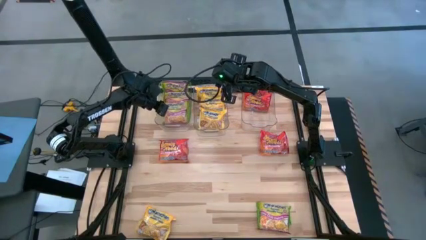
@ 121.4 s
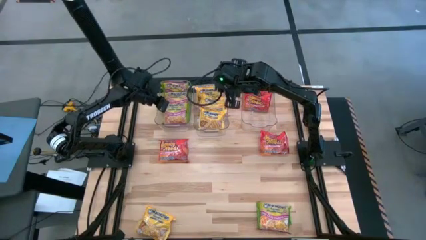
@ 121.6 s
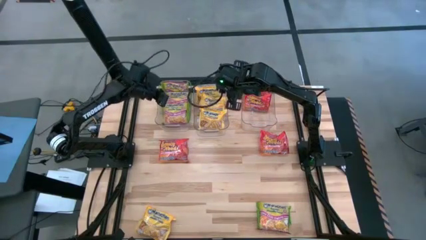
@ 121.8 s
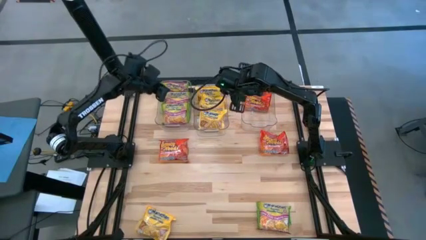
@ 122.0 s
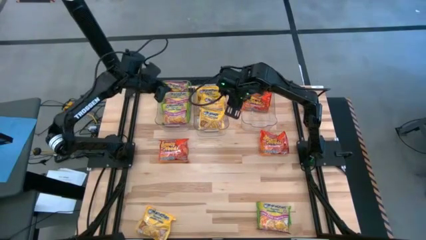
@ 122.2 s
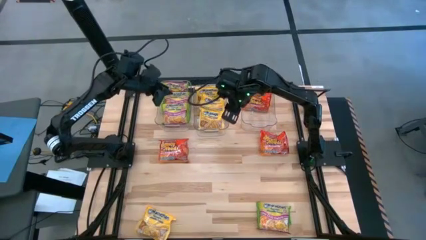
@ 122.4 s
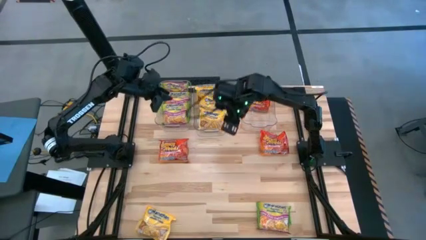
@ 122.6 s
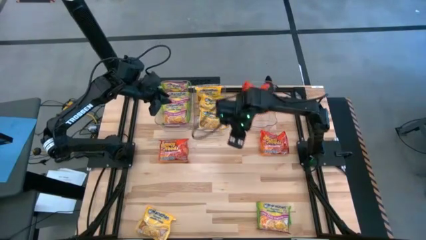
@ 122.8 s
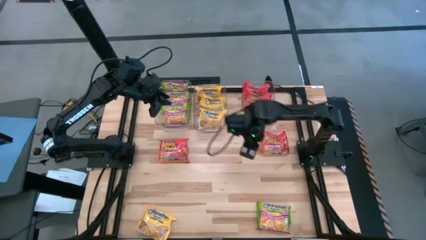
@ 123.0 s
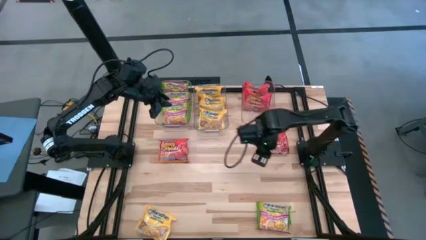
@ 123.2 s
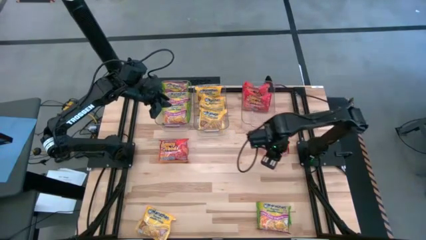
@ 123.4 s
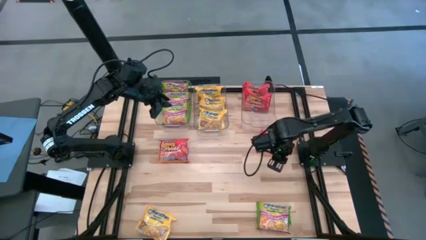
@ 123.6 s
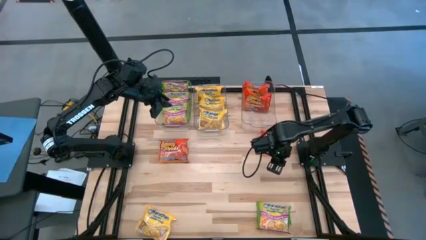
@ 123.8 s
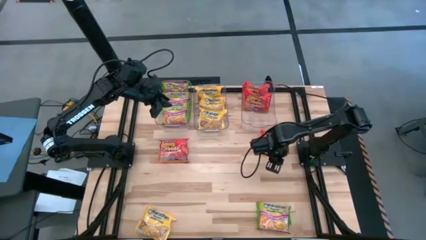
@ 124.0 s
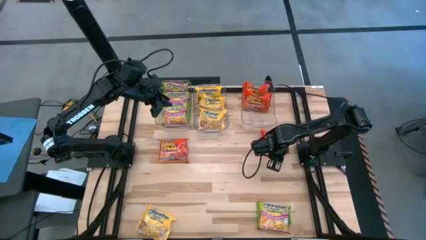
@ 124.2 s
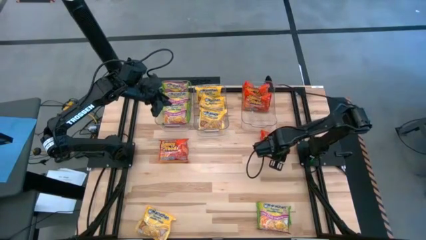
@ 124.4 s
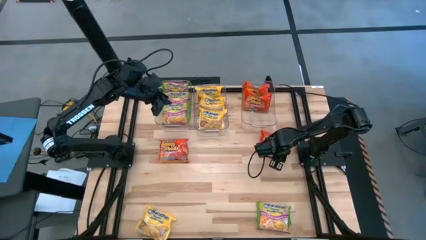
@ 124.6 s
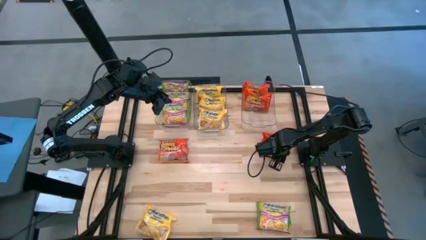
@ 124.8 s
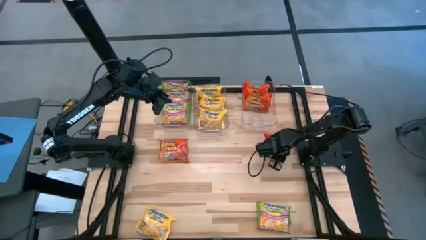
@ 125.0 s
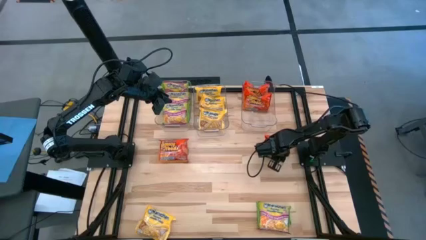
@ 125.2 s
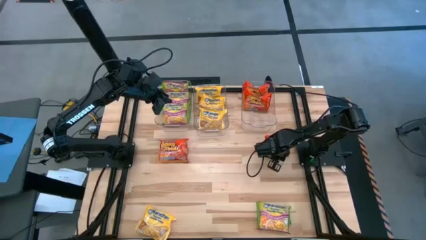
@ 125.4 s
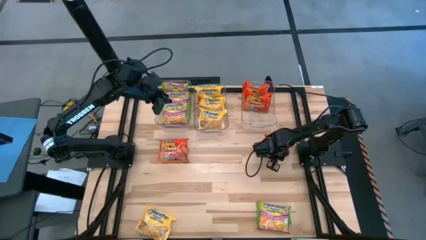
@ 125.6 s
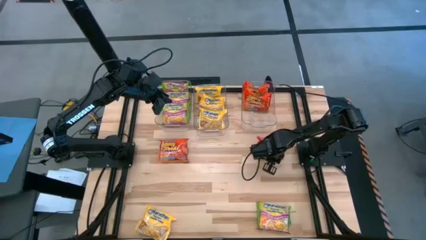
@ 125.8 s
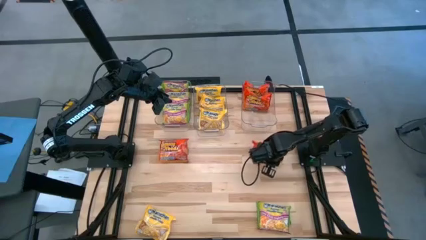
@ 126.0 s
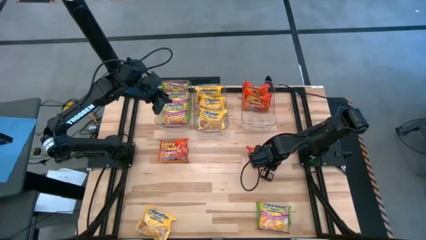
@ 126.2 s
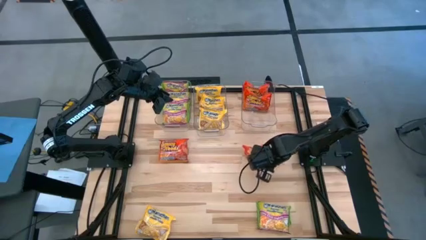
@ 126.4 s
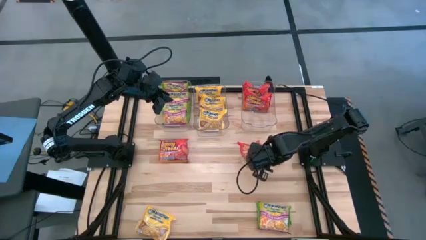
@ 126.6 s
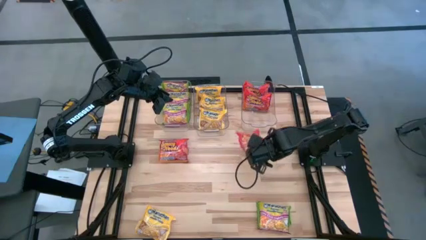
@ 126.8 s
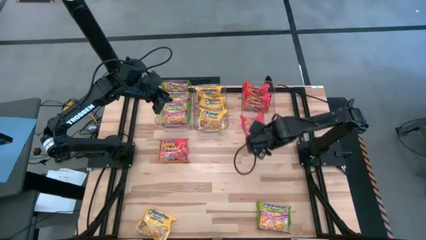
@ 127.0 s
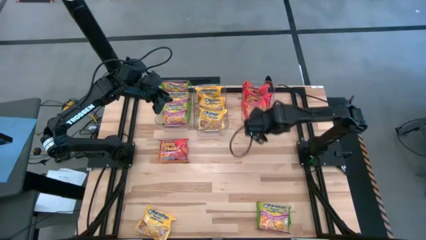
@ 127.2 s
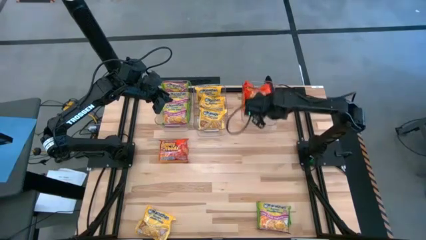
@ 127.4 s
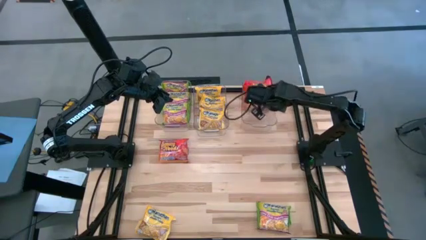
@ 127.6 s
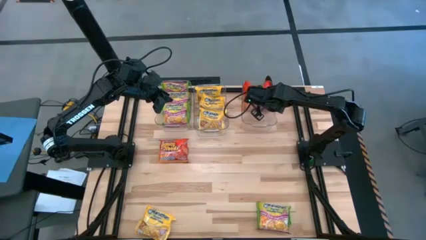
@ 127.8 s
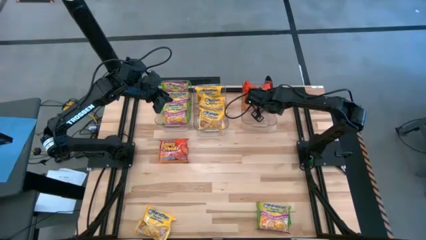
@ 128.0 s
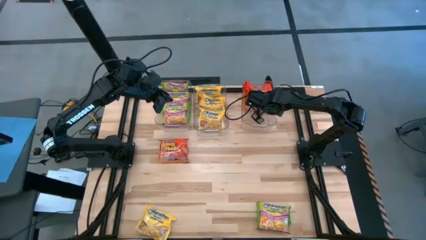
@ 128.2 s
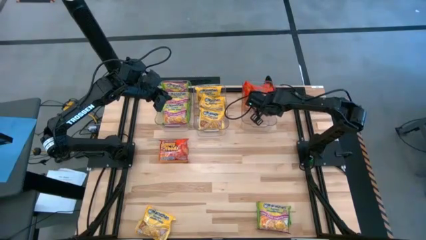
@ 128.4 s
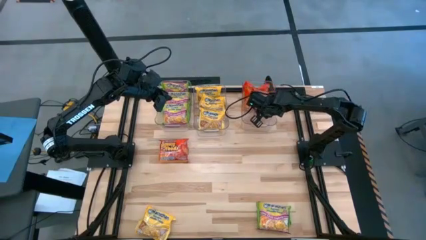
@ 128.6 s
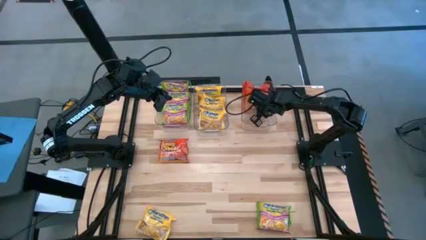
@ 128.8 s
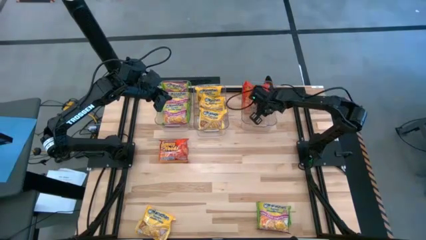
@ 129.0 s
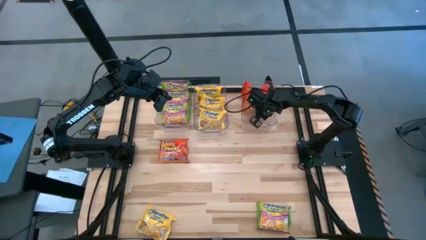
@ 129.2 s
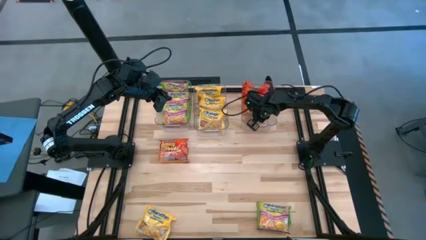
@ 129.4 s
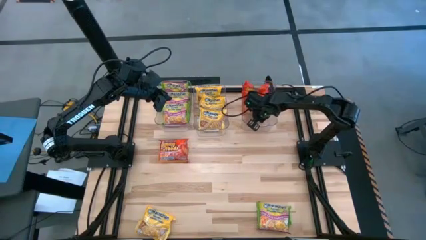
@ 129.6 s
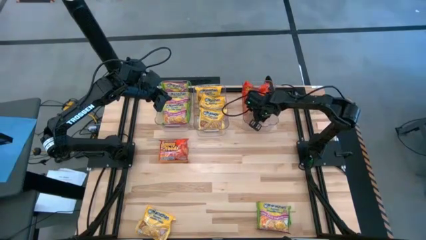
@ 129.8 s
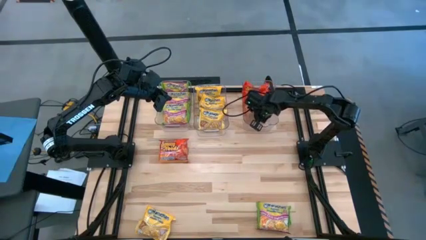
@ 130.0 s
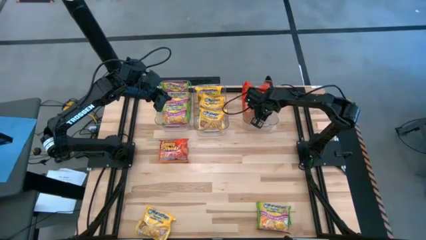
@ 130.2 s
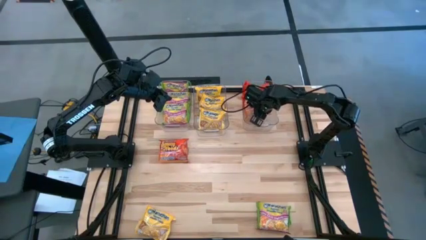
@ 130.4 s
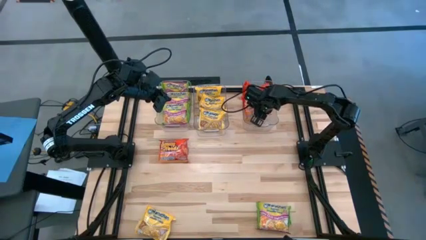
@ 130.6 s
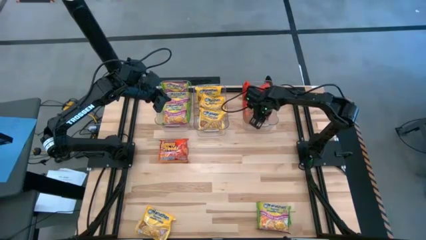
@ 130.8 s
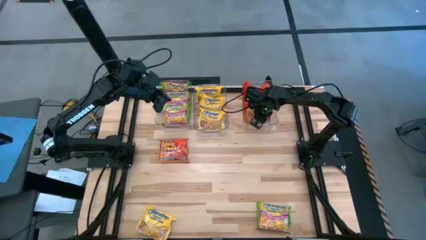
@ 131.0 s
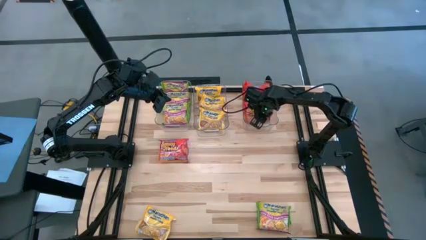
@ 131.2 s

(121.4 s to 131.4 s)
Task: Sort Maruchan noodles
Put the orange noodle pack into the right transparent bin

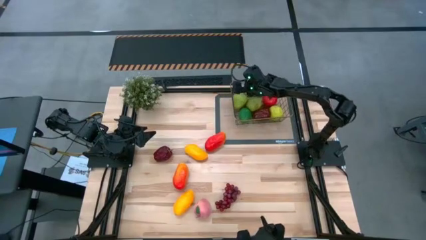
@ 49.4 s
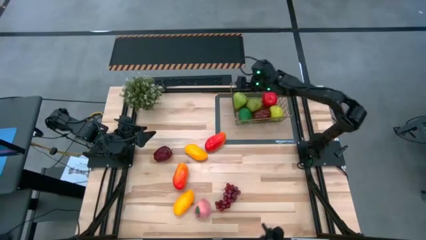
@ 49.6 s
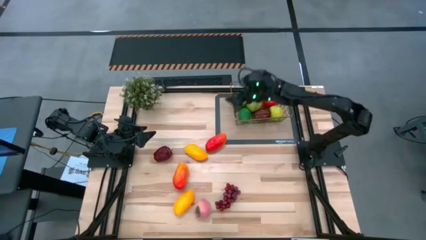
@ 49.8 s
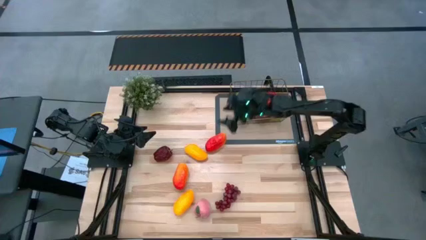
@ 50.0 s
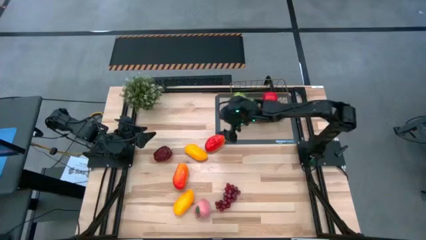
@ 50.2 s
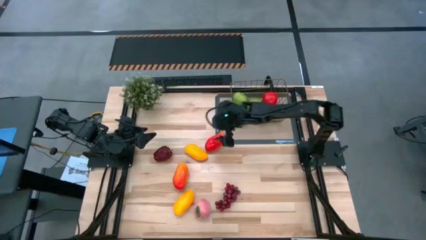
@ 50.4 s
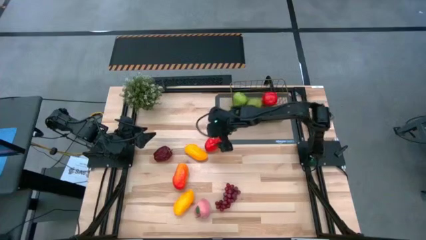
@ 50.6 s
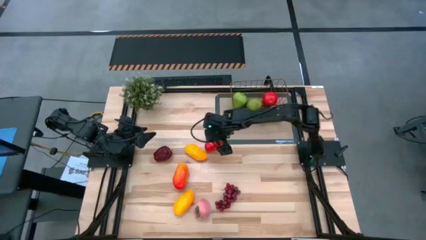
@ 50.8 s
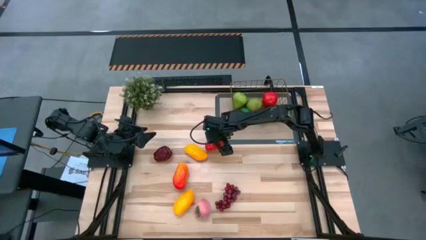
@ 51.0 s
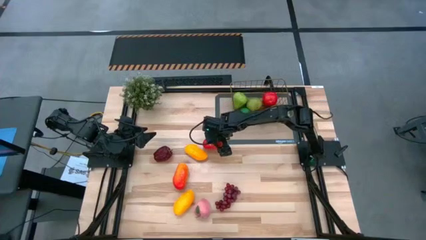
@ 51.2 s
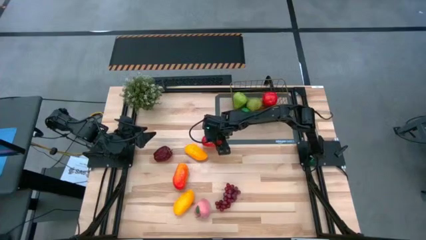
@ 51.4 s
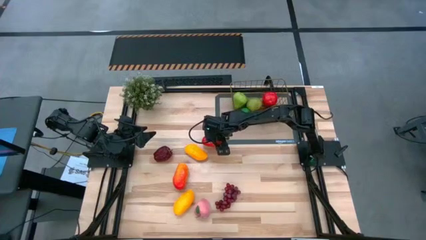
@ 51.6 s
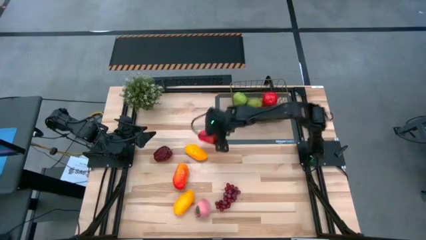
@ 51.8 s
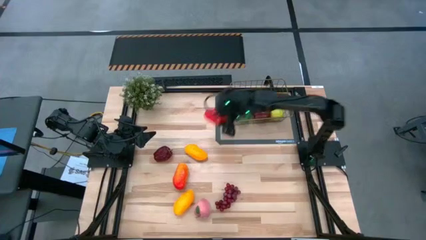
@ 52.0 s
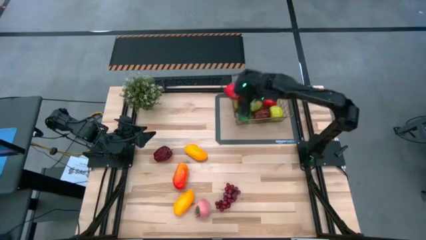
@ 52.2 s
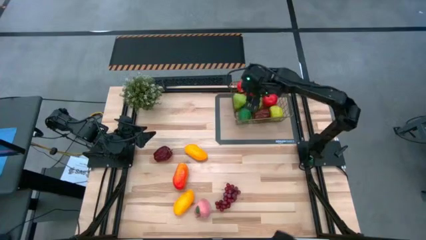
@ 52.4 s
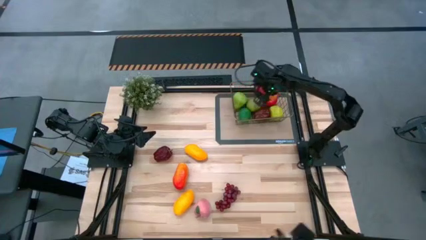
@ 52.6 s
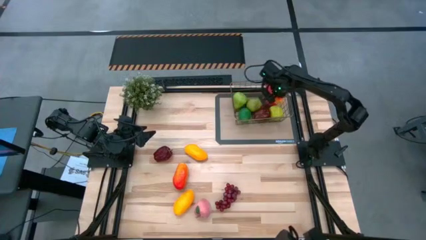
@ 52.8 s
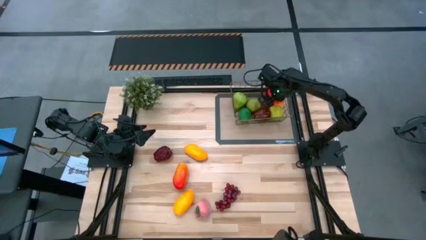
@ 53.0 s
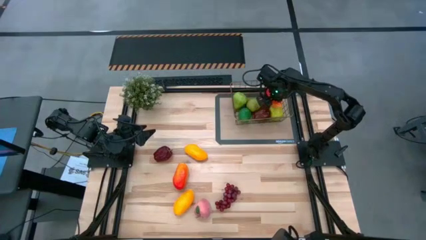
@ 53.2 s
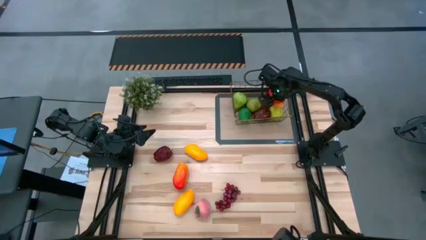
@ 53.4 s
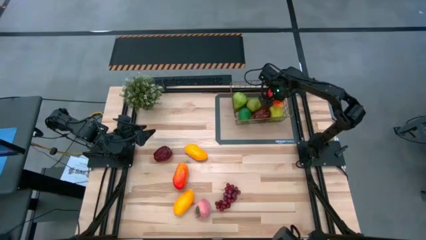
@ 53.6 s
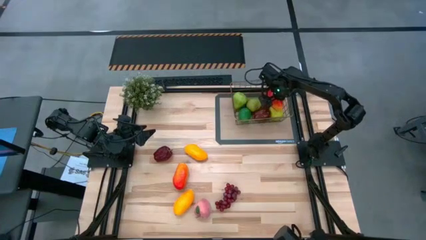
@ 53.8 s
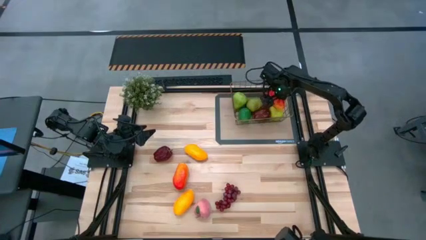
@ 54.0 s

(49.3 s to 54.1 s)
Task: Build produce basket
Put the red mango into the gold wire basket

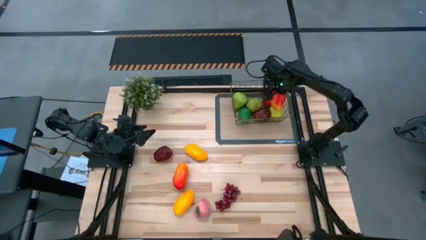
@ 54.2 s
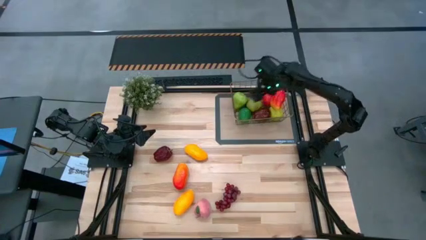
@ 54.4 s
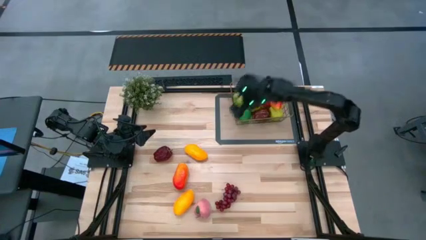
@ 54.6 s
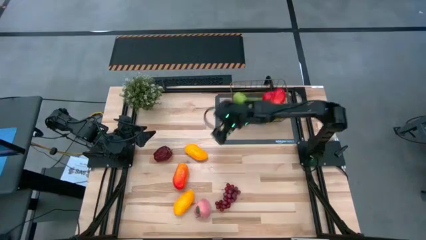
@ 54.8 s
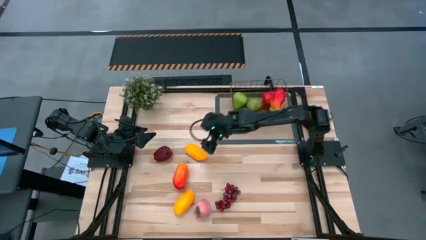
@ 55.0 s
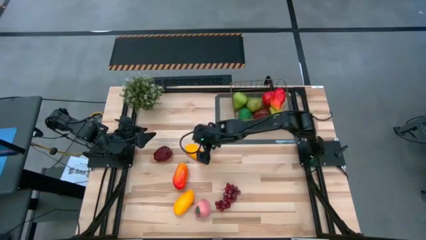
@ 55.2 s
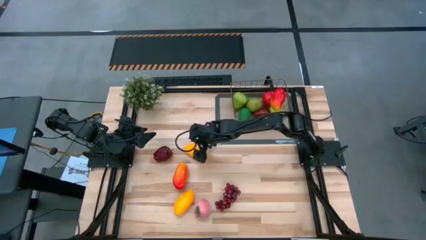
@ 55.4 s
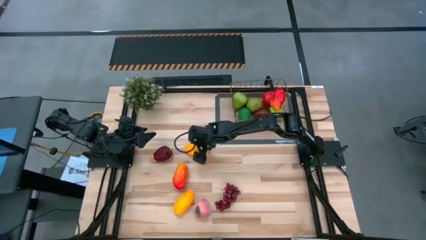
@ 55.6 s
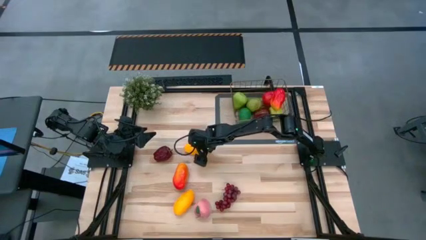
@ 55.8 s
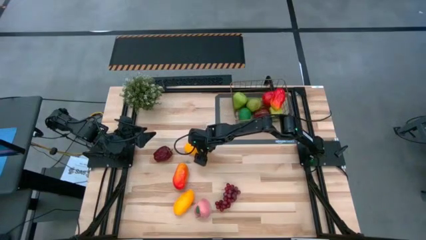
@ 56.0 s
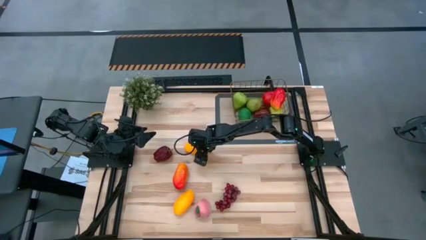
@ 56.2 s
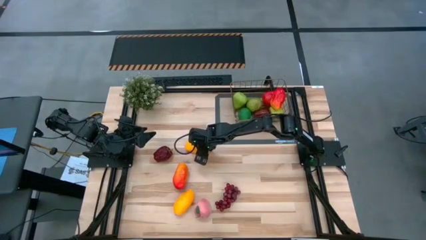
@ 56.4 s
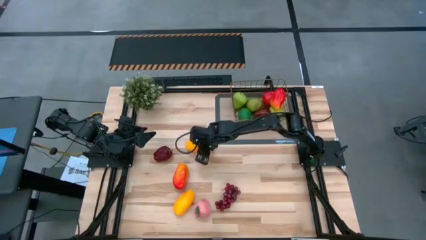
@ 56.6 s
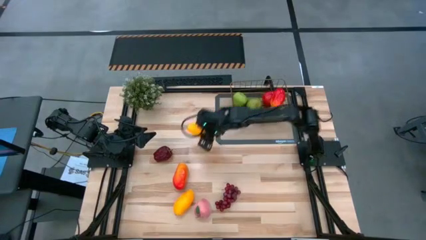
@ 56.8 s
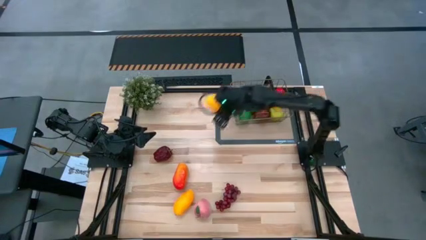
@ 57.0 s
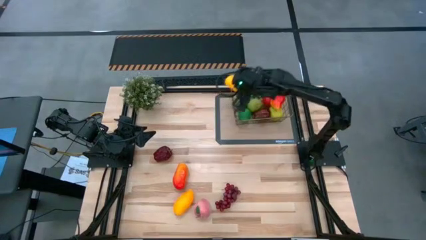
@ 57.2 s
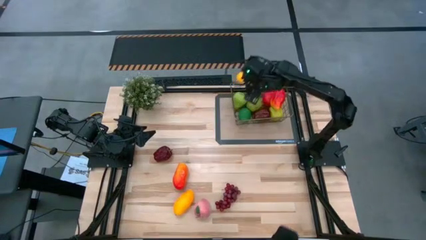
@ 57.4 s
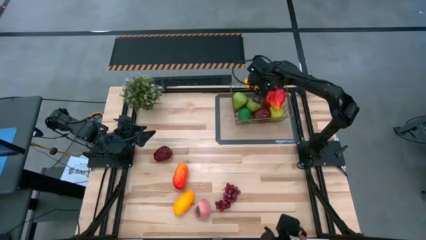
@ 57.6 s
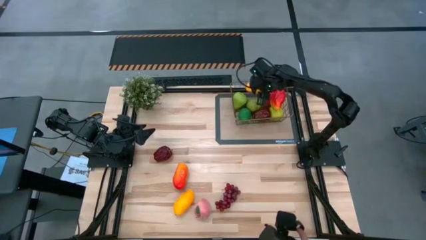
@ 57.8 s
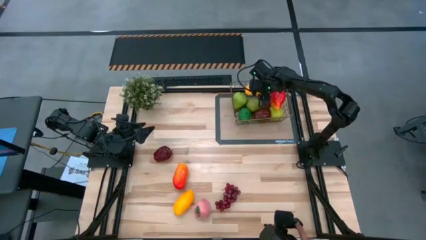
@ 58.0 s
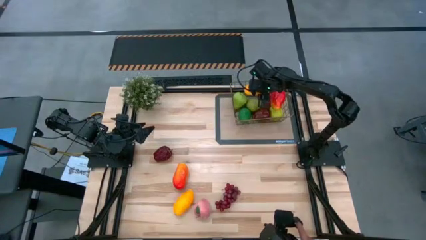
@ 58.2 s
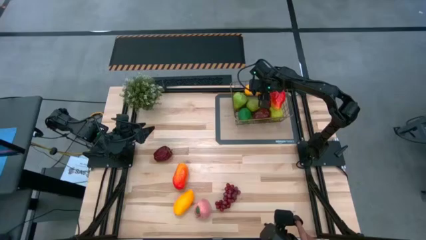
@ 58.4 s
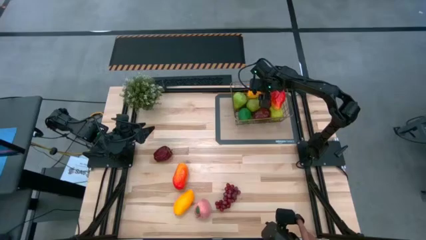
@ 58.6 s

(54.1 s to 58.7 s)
Put the yellow mango into the gold wire basket
